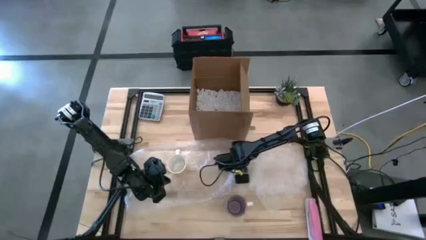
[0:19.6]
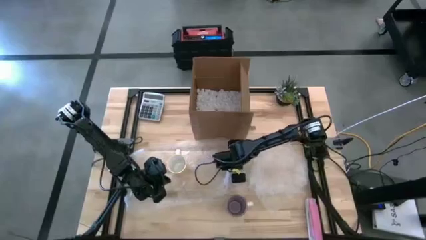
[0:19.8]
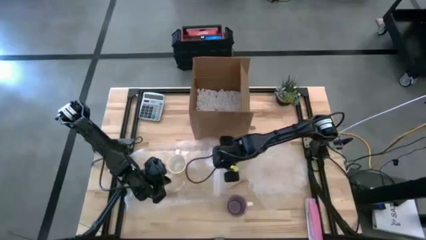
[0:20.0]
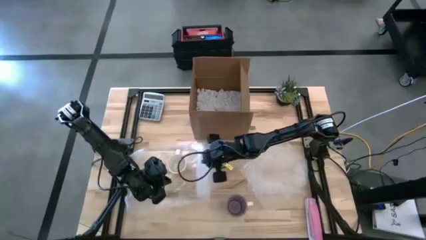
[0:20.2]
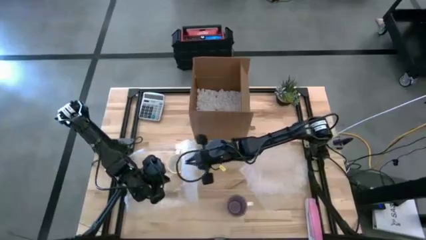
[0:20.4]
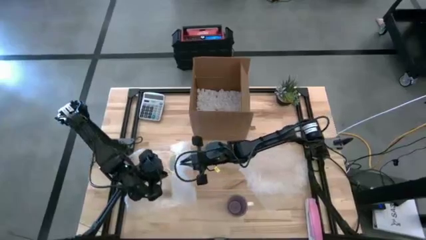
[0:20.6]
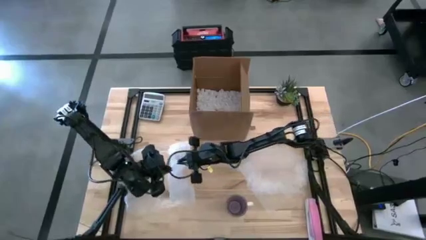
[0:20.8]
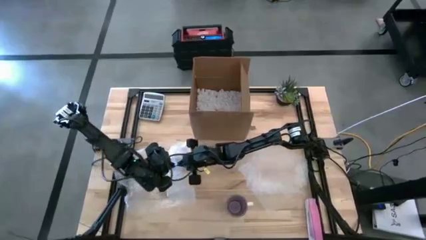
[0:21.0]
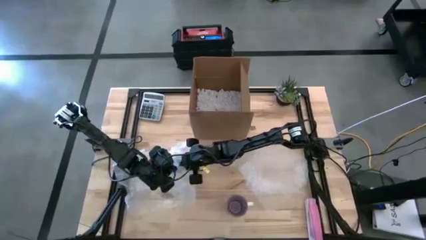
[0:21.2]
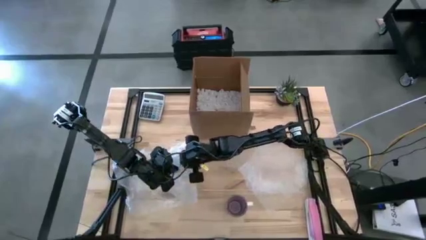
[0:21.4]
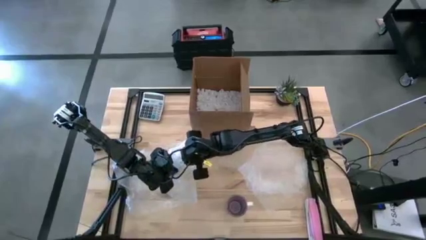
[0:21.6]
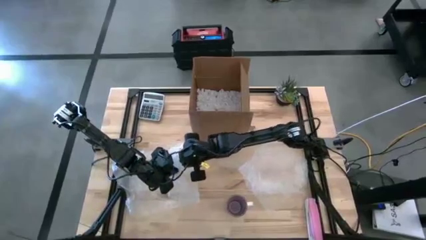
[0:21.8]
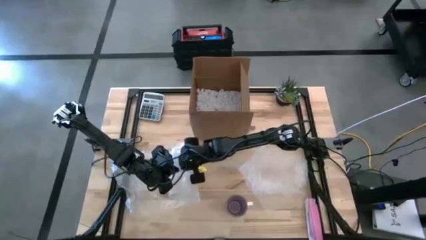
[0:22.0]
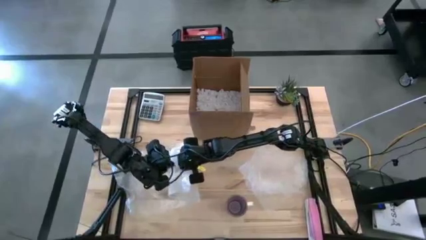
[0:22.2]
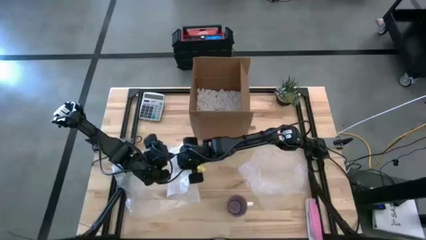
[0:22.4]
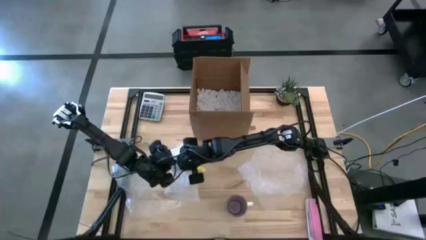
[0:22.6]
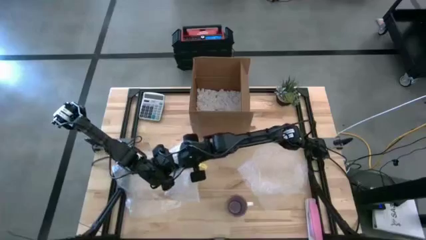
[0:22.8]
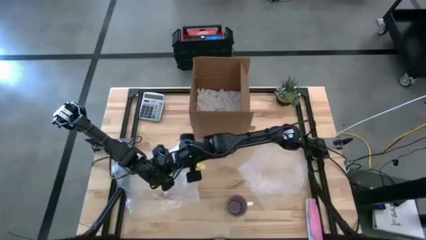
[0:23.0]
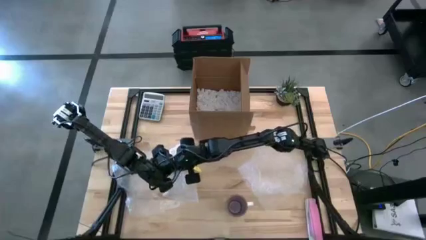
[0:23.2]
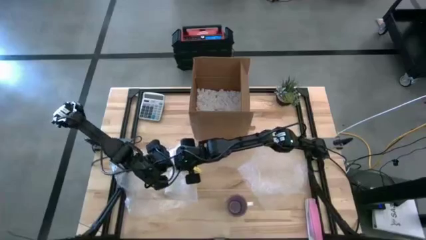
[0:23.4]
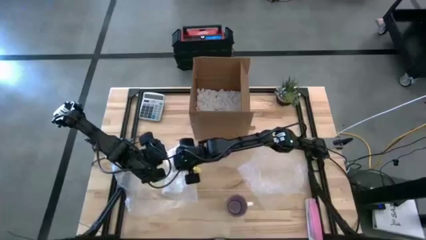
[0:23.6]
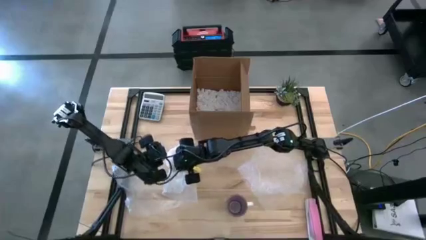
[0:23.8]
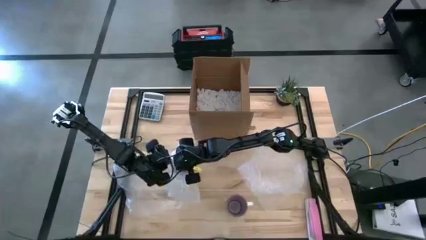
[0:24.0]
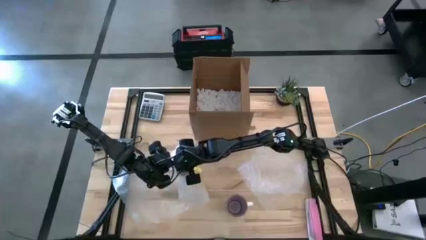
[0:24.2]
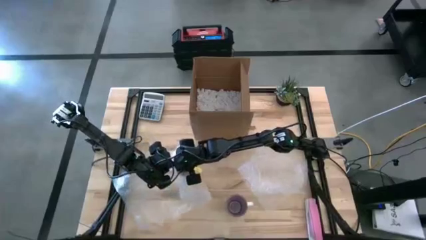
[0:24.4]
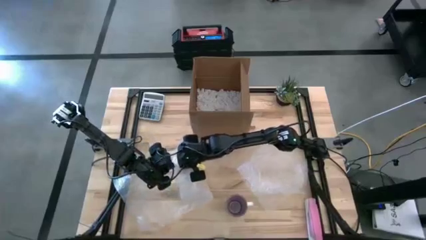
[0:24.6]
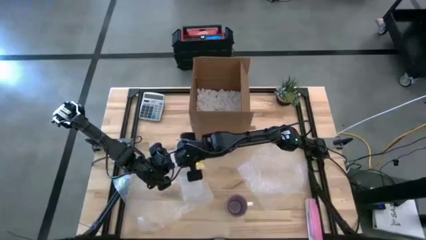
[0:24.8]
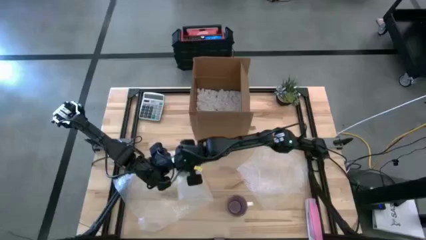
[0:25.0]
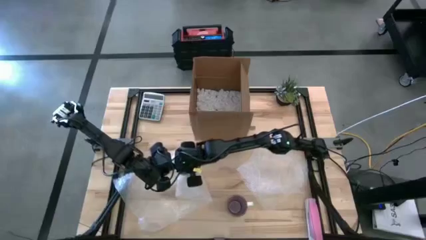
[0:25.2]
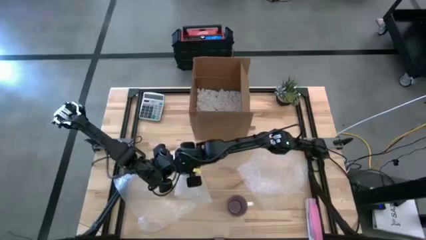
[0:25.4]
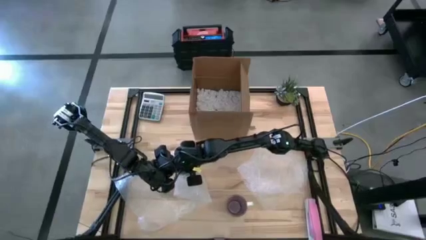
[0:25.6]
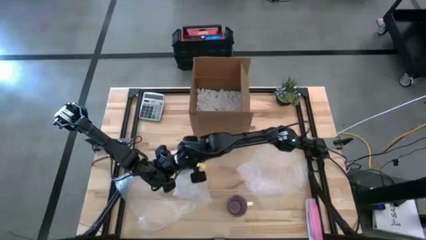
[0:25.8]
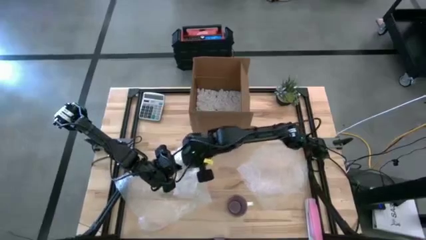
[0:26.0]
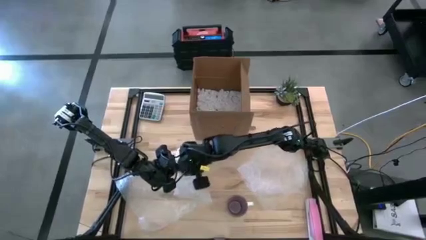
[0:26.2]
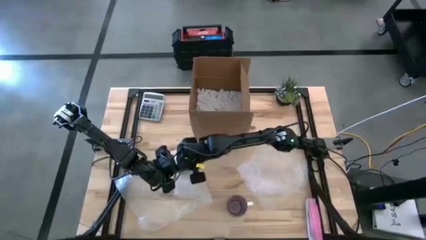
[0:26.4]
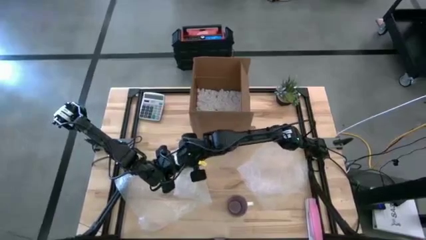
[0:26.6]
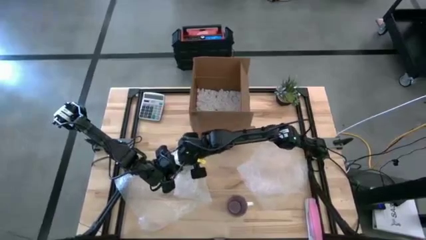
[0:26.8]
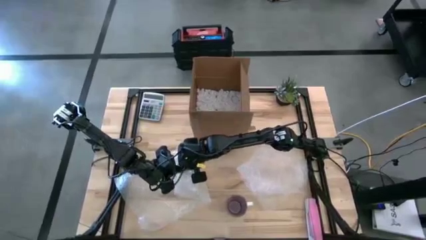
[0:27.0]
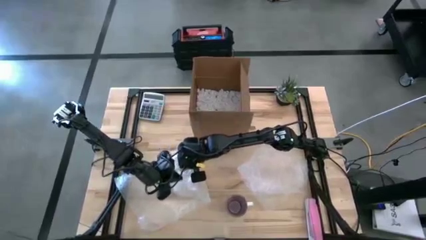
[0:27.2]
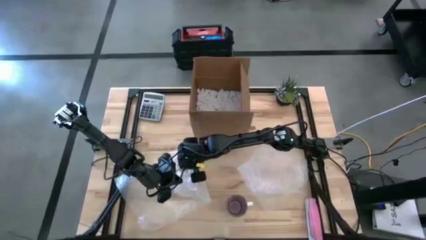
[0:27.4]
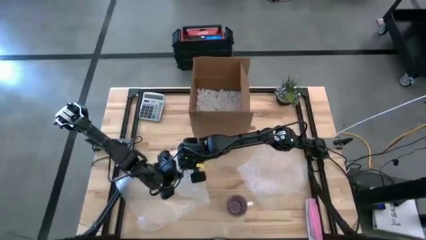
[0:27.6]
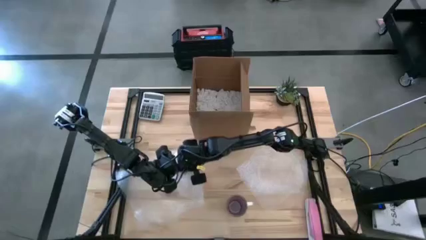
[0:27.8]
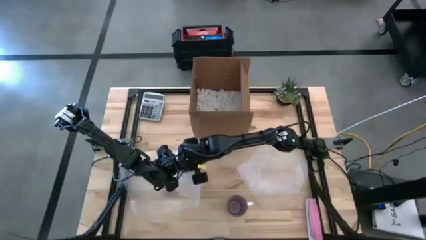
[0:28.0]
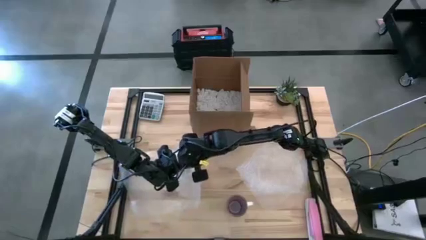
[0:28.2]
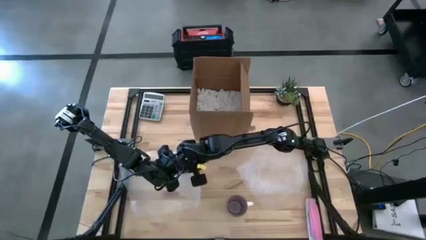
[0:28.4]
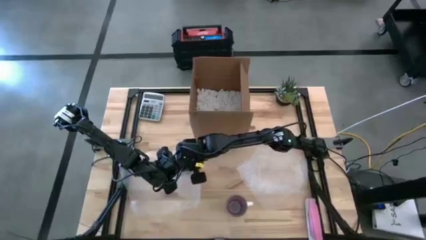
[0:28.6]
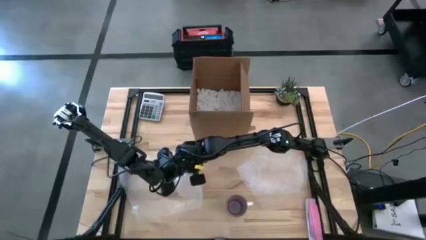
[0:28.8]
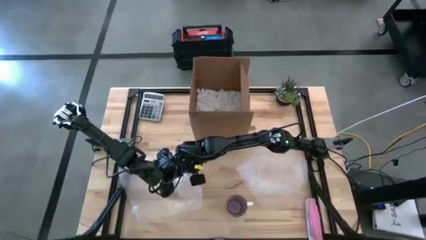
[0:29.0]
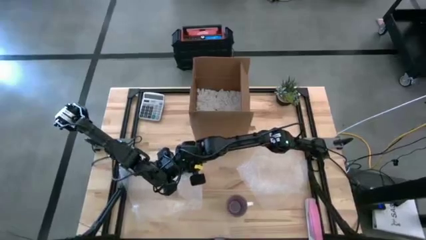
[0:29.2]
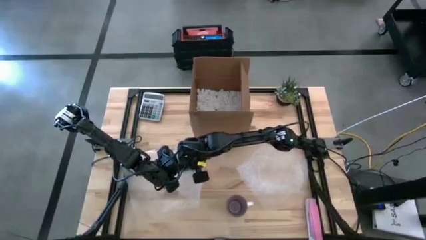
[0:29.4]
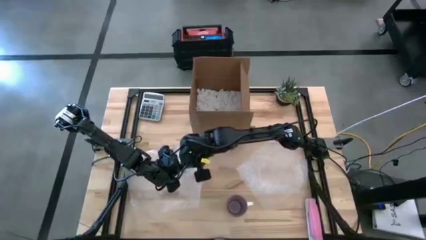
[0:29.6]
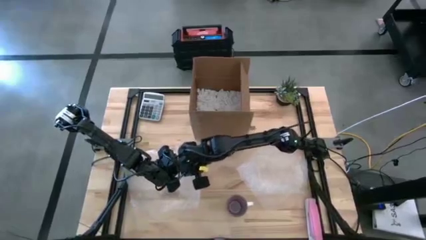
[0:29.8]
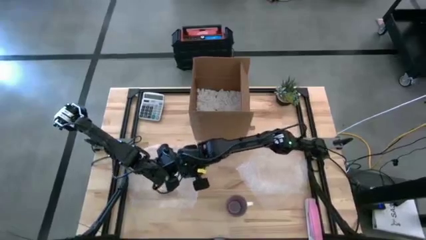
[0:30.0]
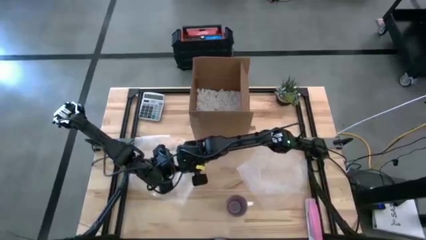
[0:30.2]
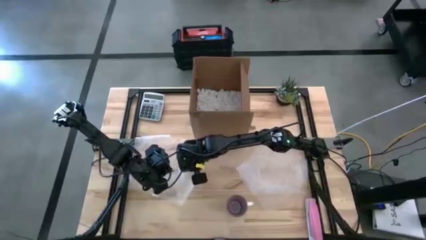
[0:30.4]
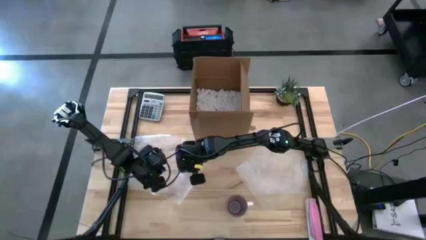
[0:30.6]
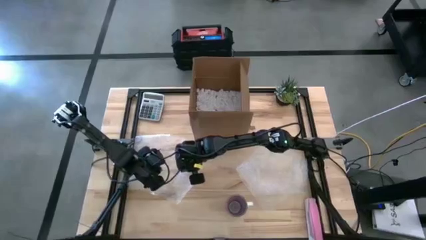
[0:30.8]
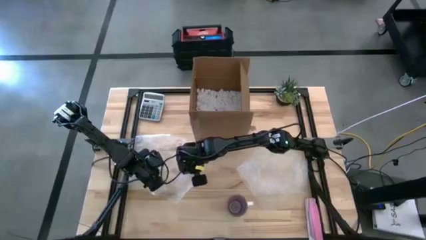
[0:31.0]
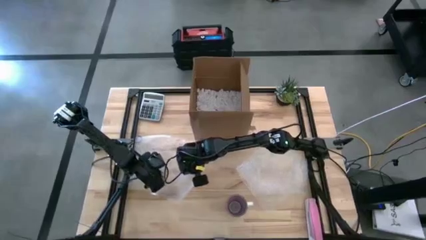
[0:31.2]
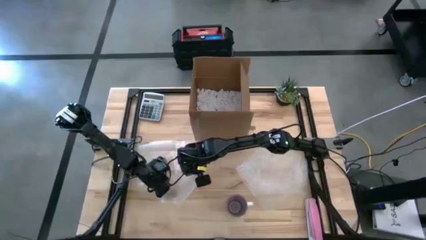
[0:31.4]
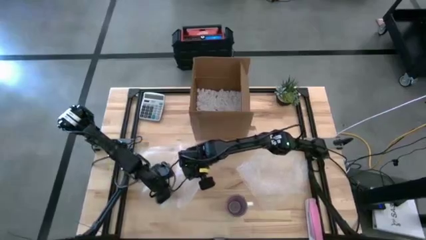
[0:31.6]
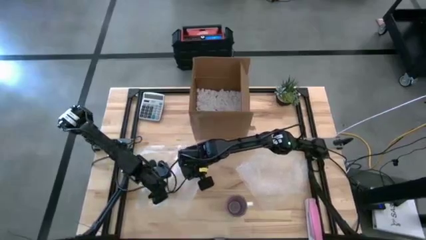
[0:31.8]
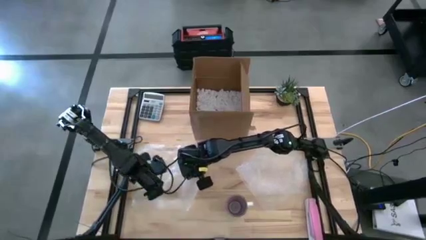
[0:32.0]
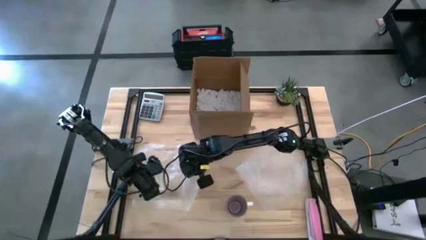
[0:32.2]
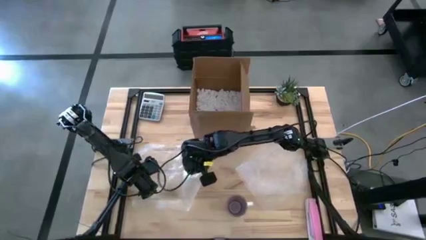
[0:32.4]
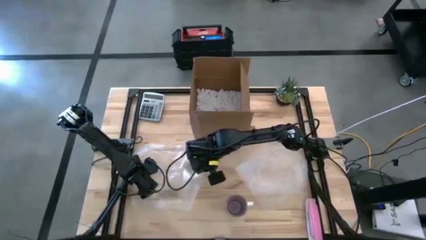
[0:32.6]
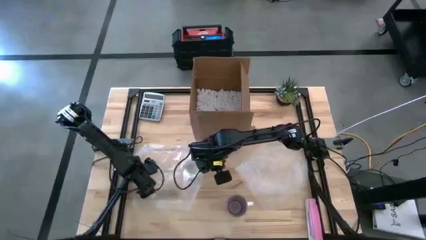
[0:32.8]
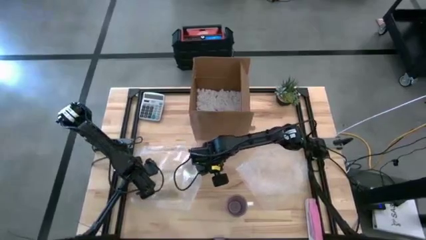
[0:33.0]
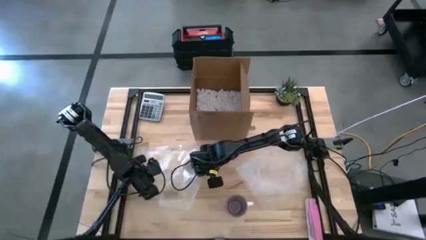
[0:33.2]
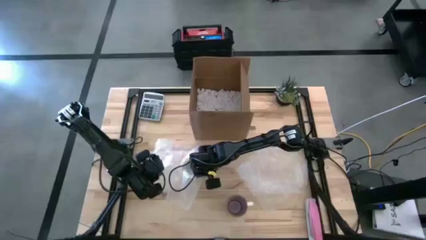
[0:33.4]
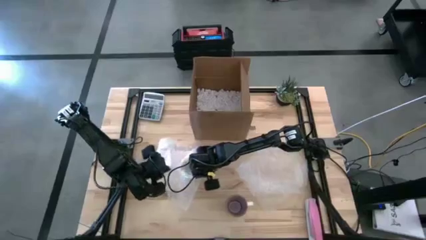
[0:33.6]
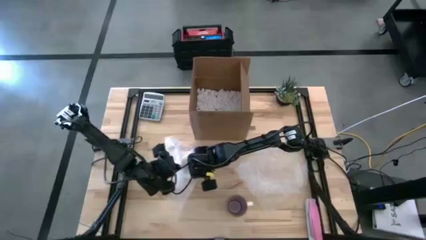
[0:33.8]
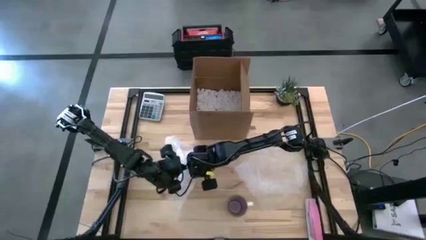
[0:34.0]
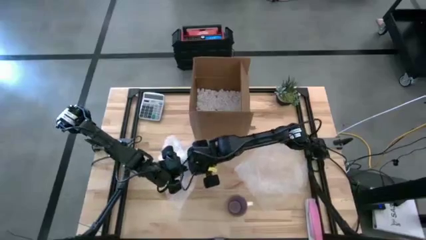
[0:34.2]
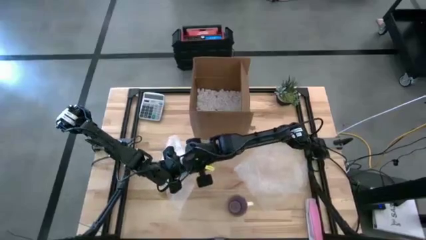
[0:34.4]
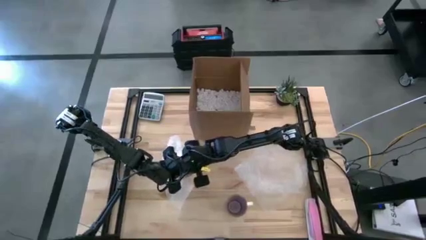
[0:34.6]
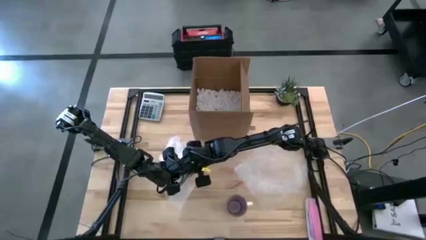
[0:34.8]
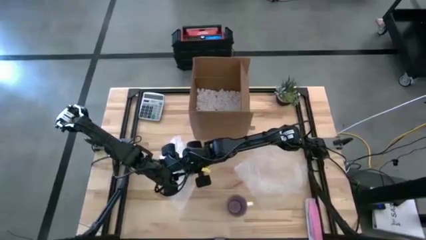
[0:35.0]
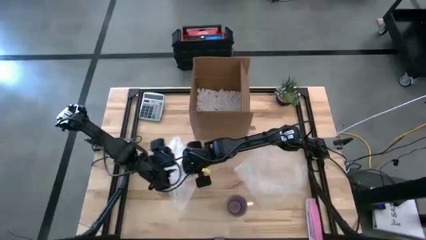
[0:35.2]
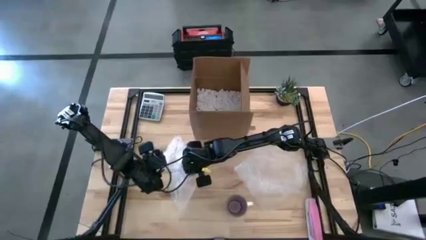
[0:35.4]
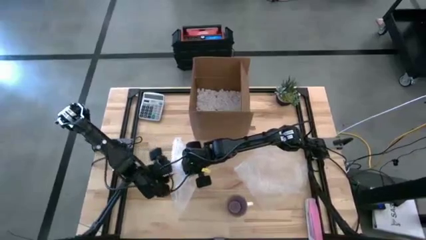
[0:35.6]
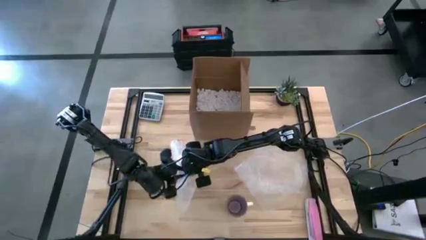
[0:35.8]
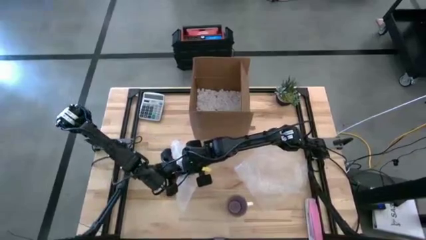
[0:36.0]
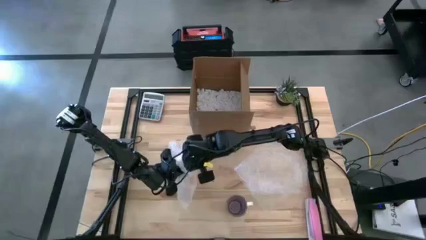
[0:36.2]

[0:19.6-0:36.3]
Task: wrap mug
Wrap the yellow mug with bubble wrap
